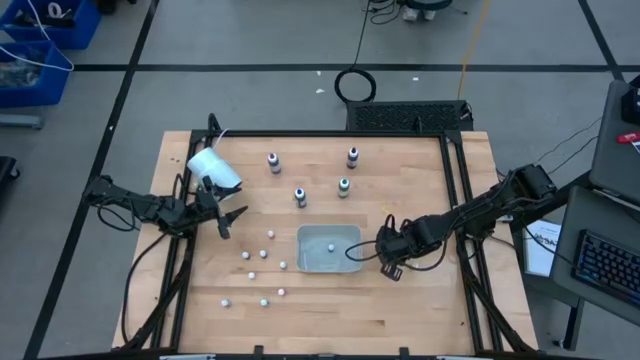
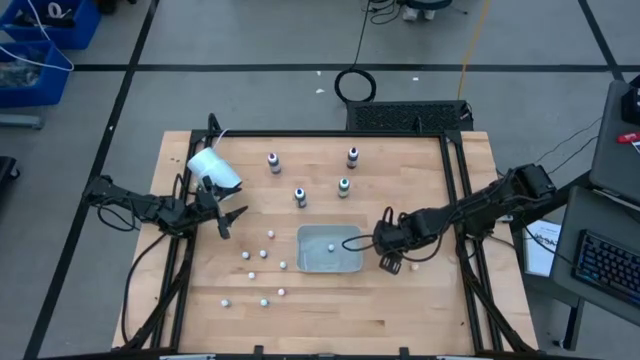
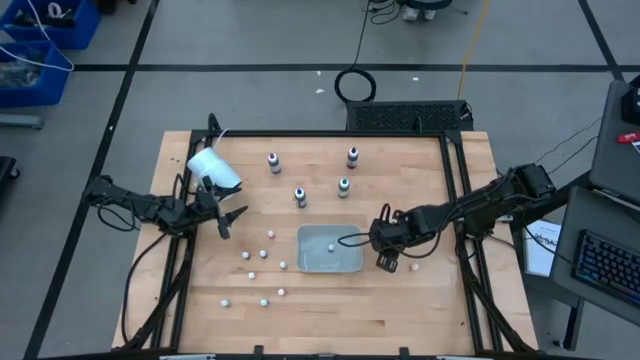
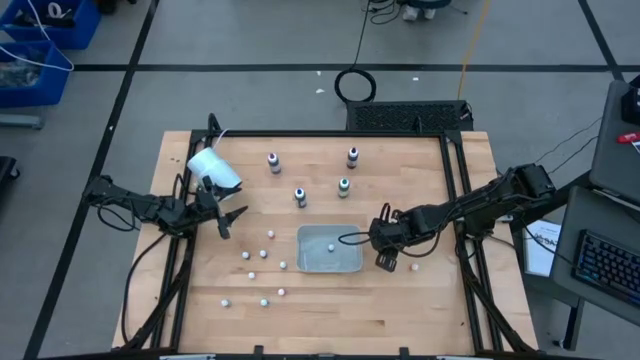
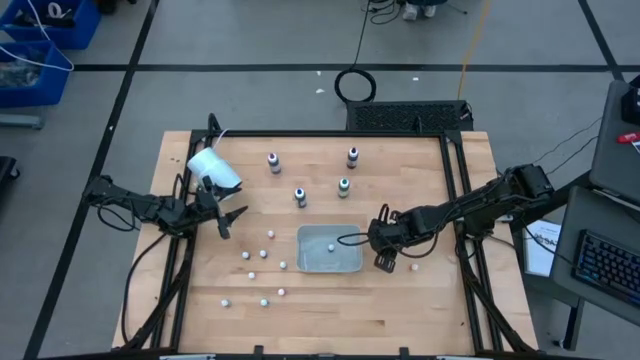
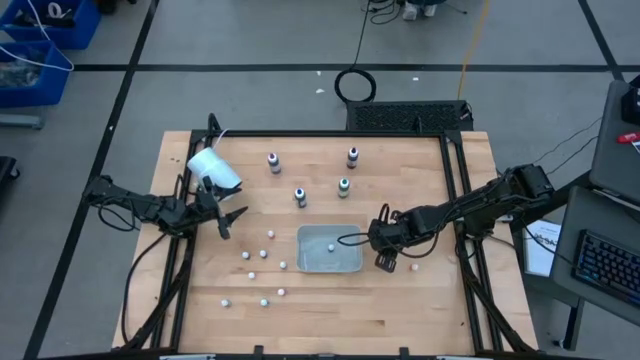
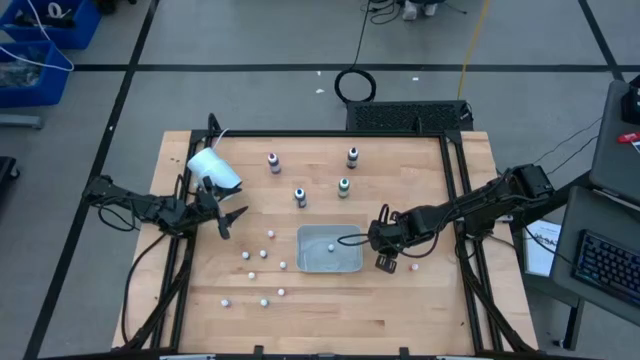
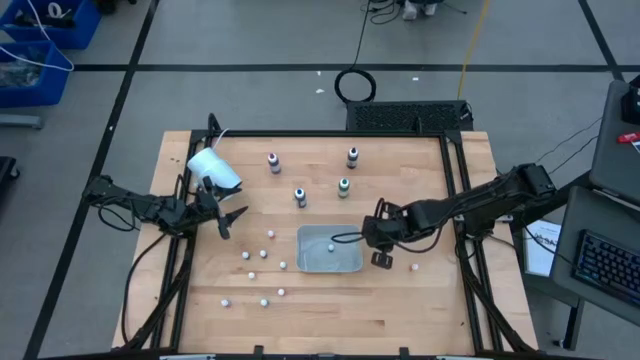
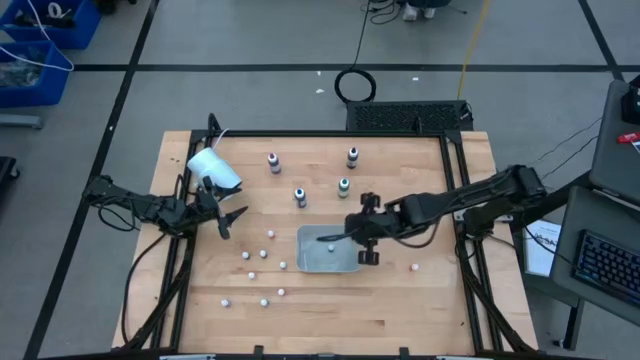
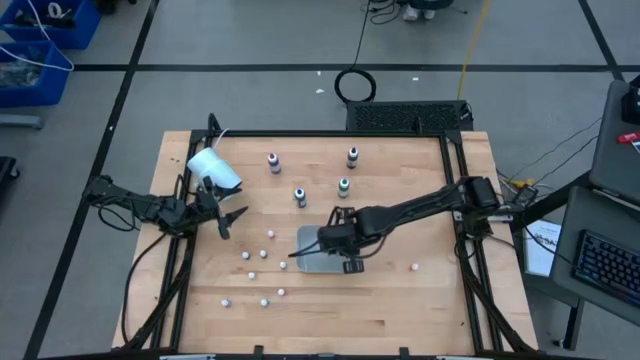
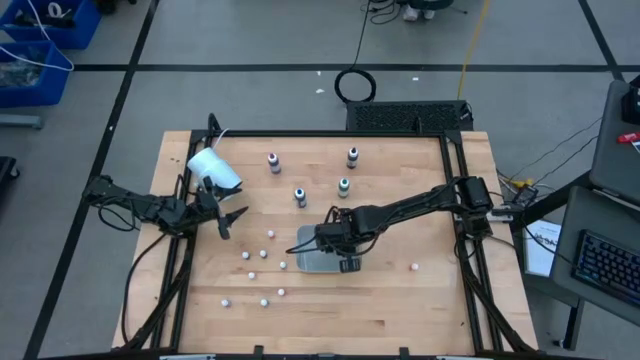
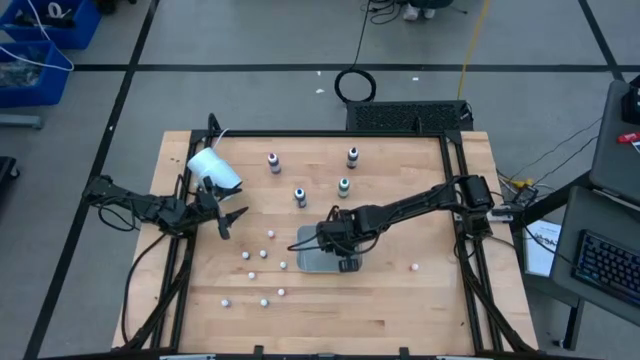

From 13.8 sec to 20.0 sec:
Task: Pick & Place food coloring
Put the purple food coloring bottle into the bin

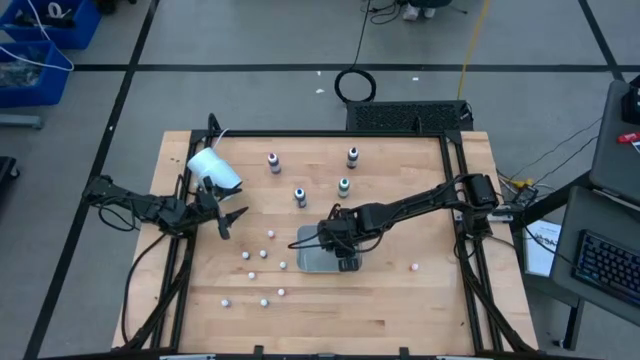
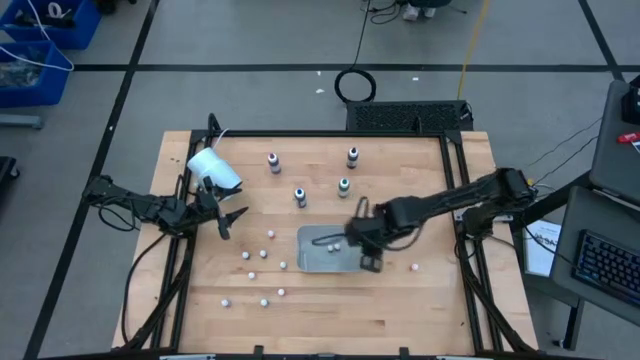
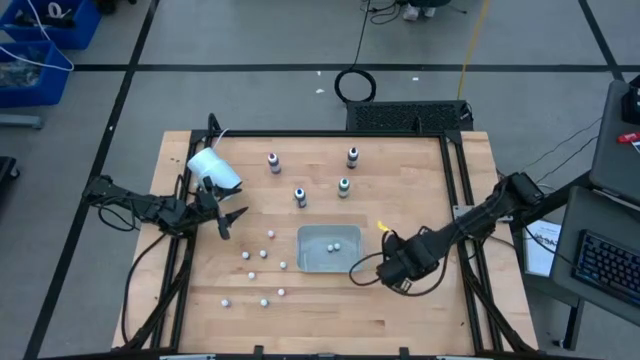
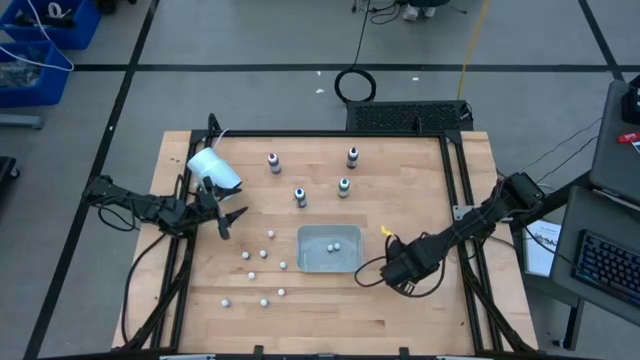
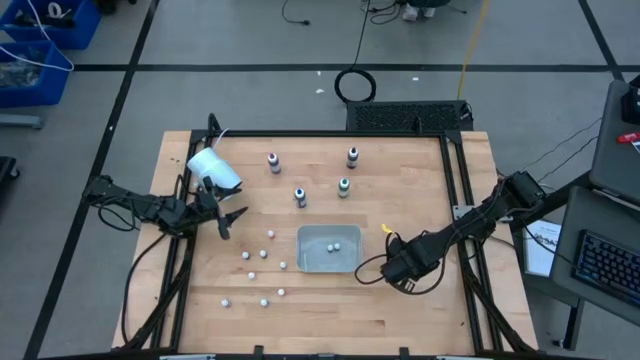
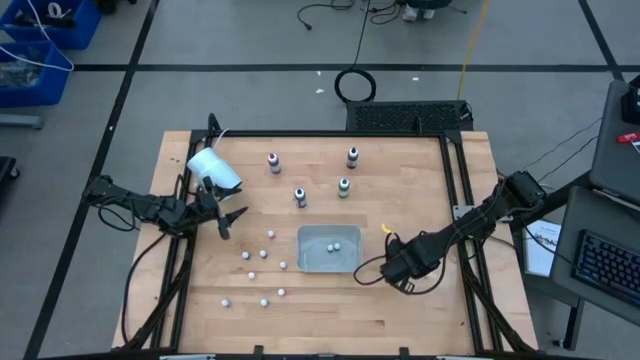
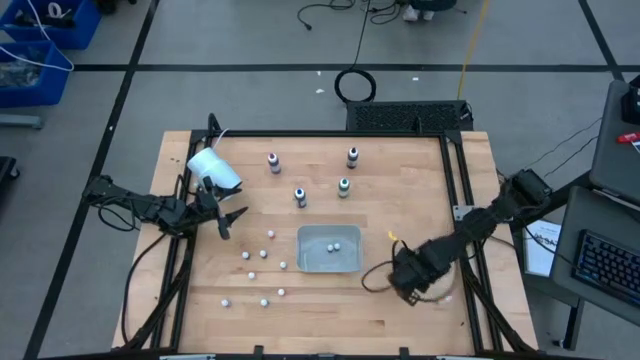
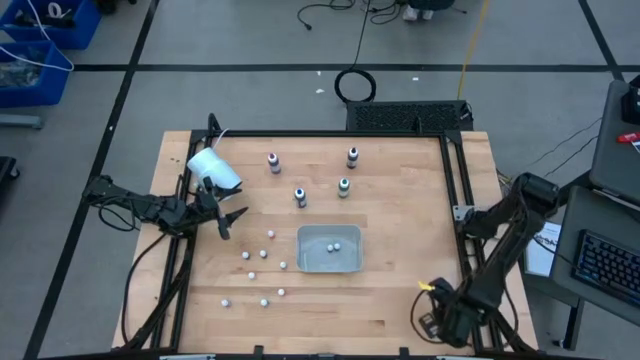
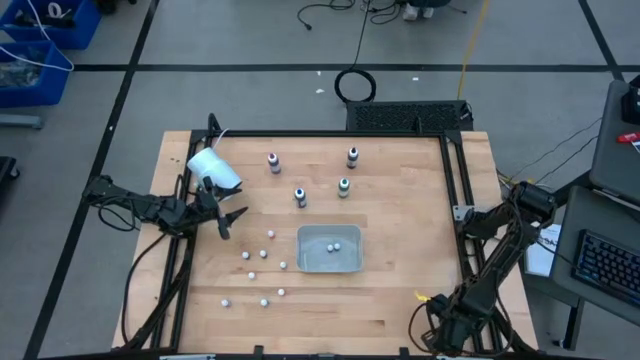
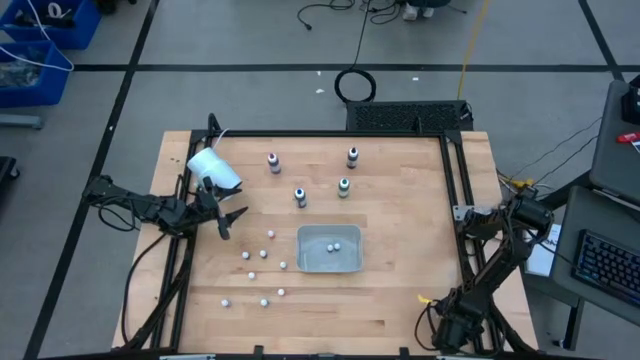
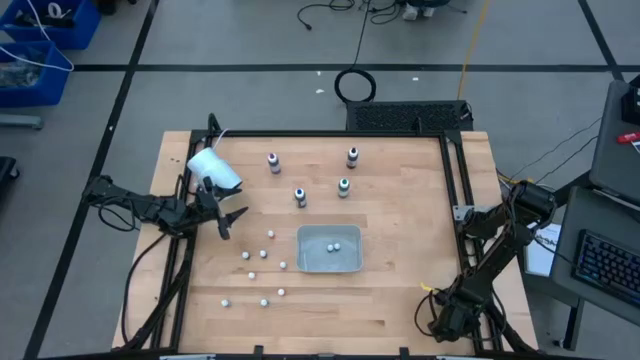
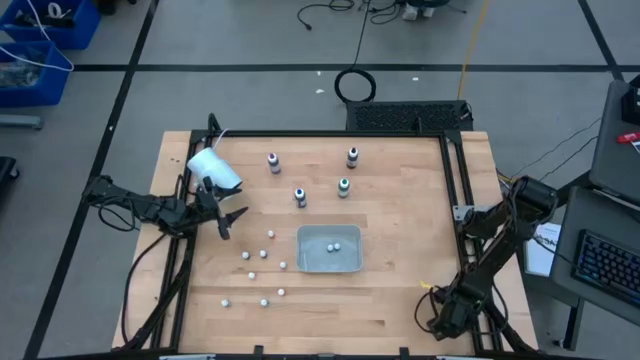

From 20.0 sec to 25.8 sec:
Put the orange food coloring bottle into the bin

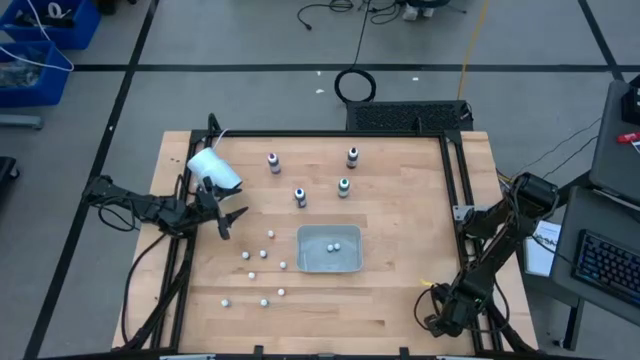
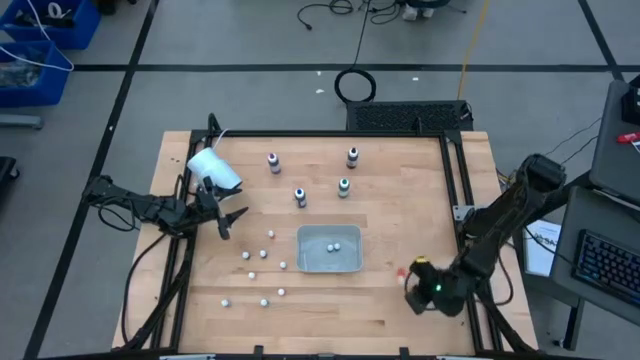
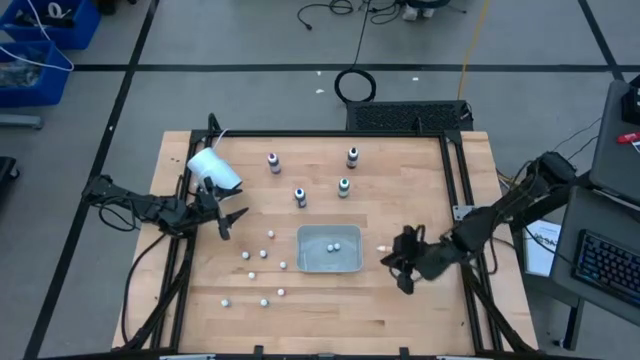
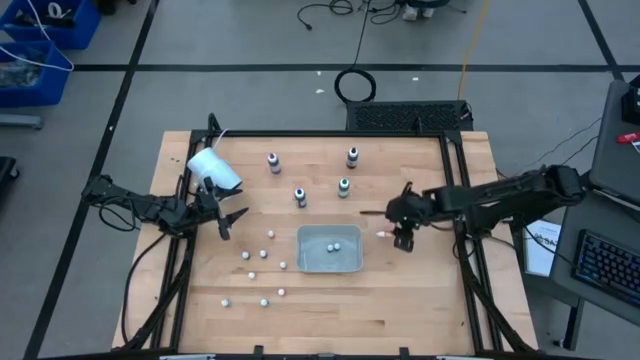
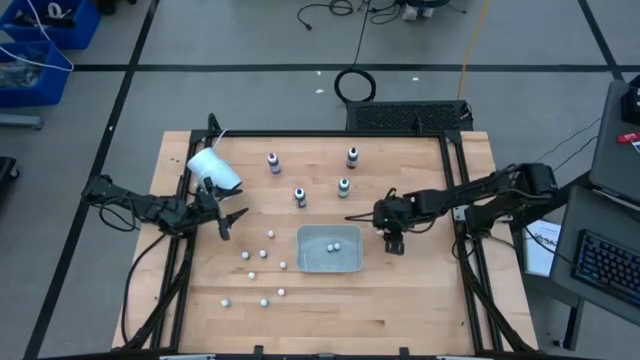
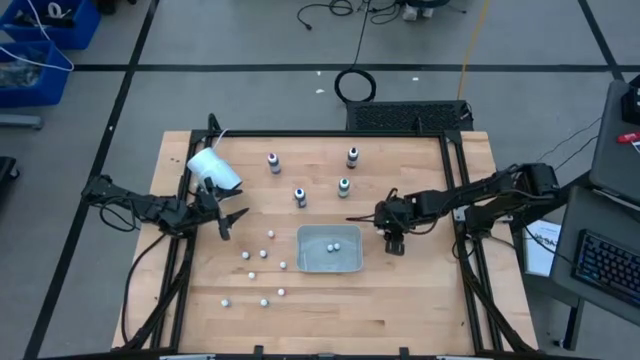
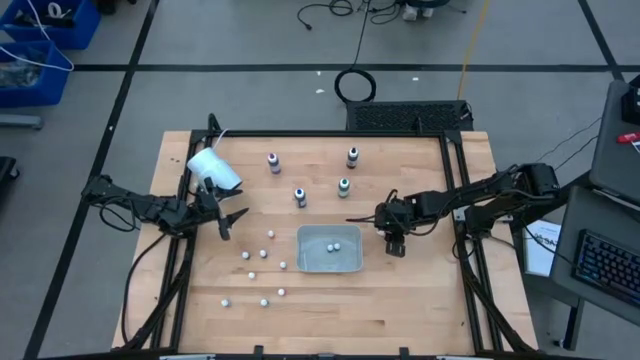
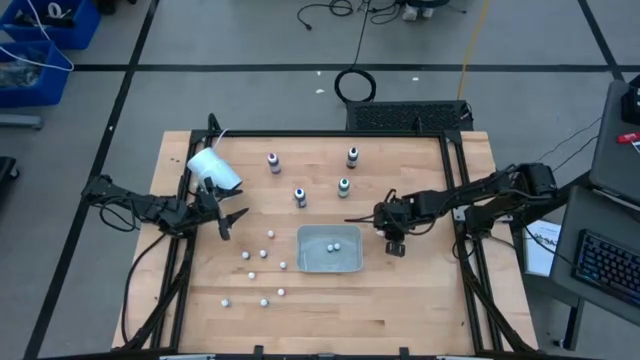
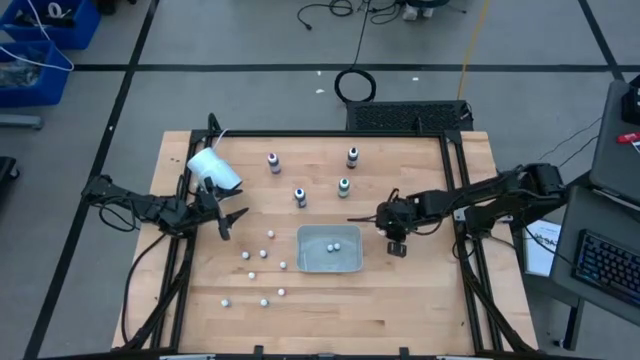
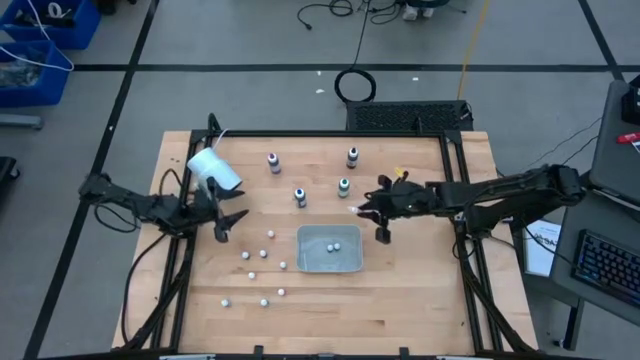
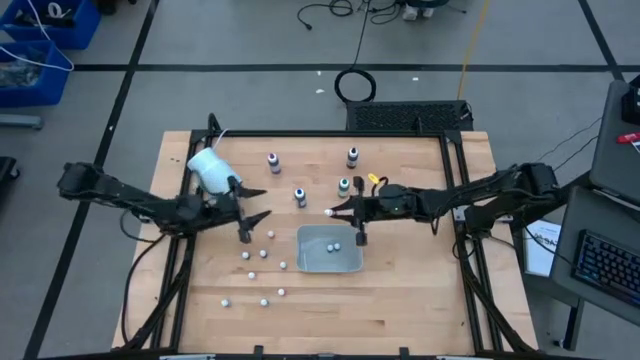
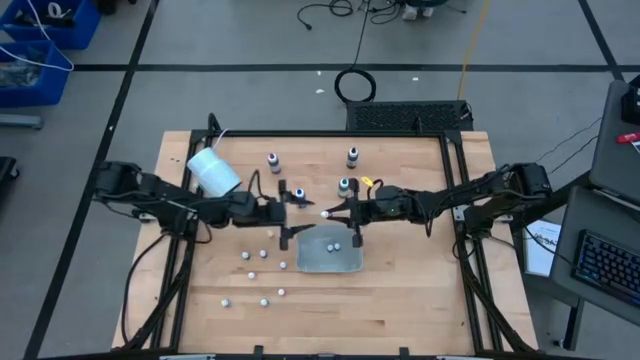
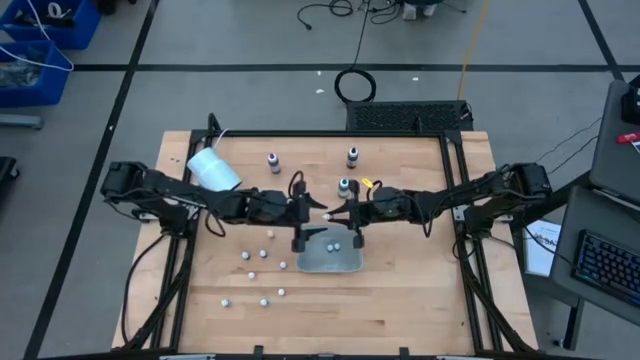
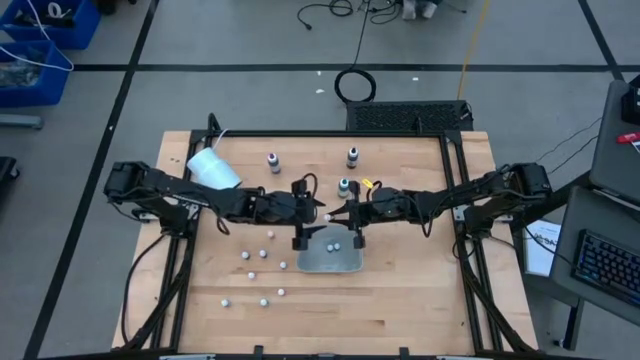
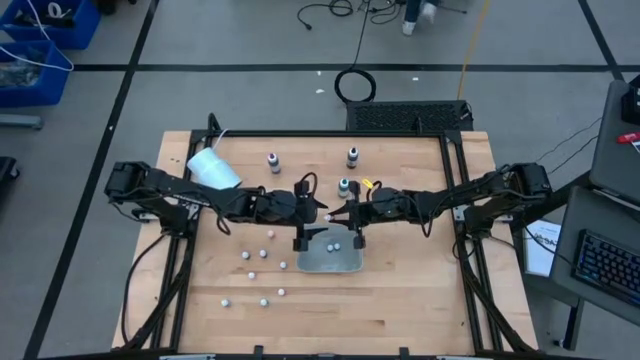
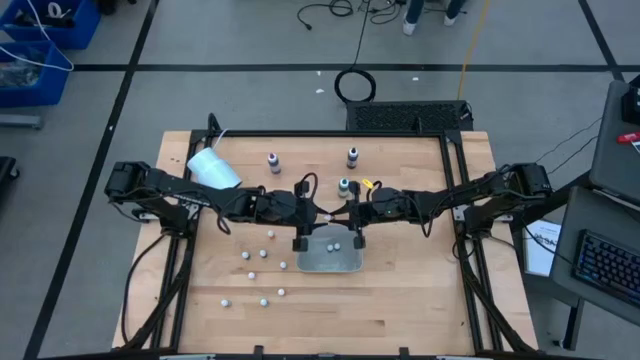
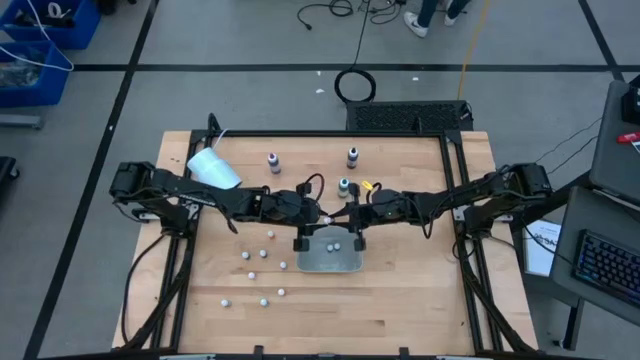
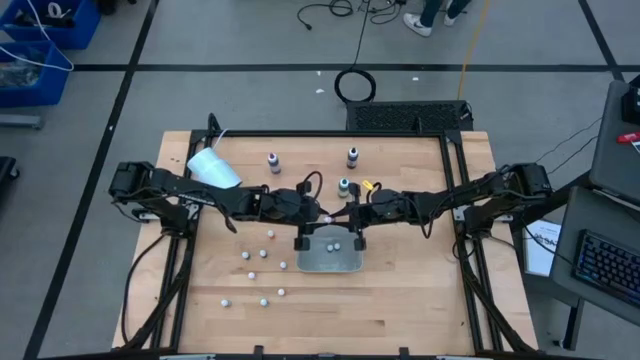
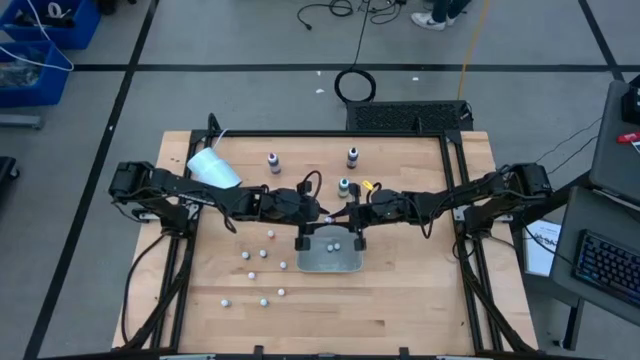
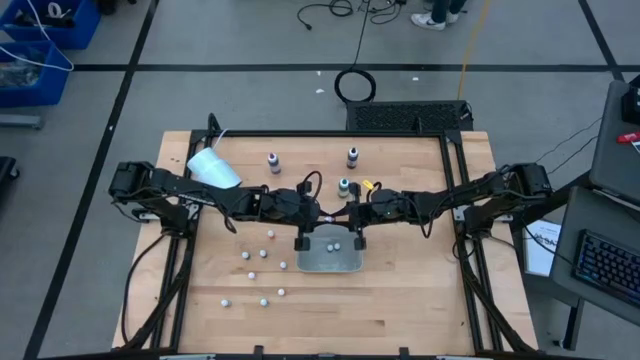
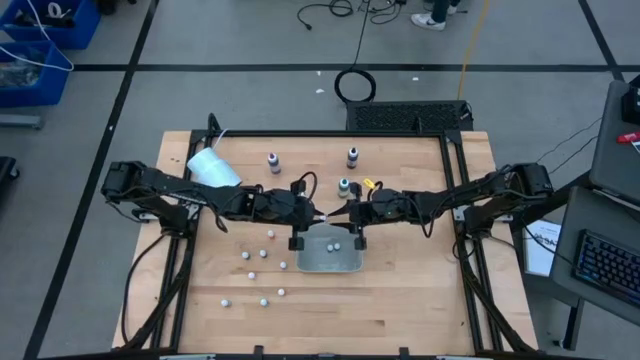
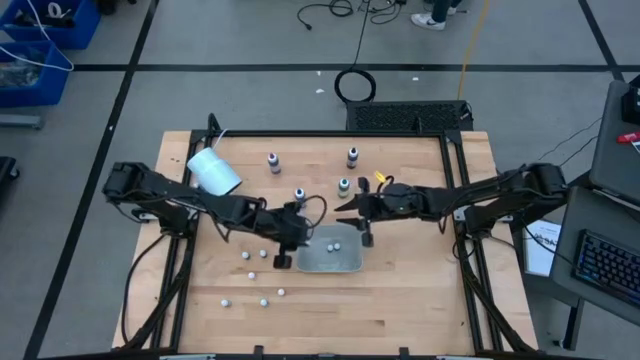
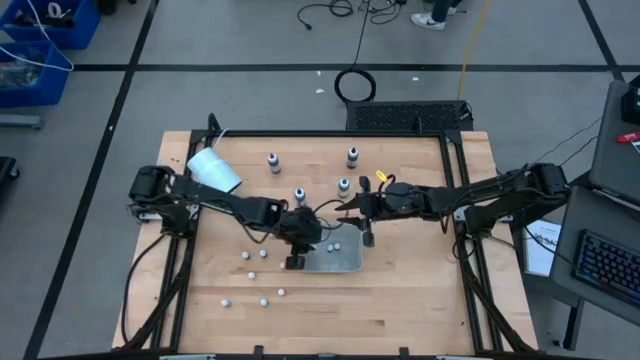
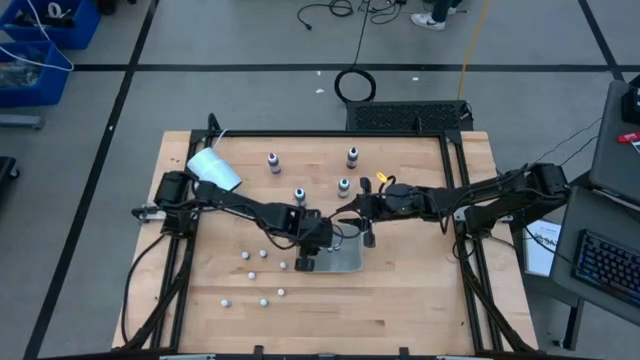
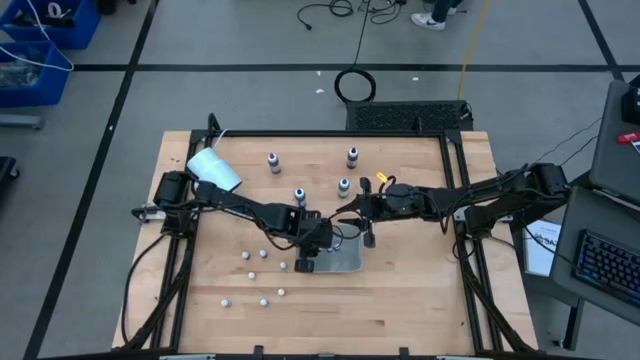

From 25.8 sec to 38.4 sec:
Put the orange food coloring bottle into the bin
